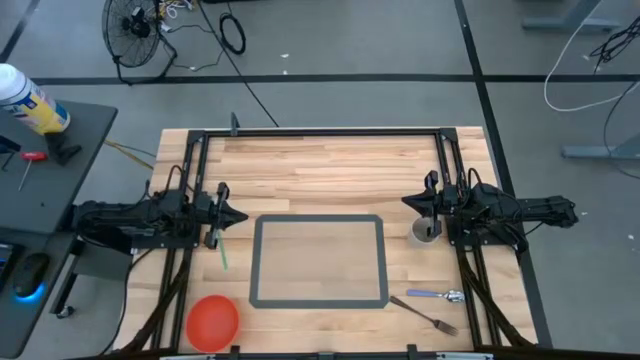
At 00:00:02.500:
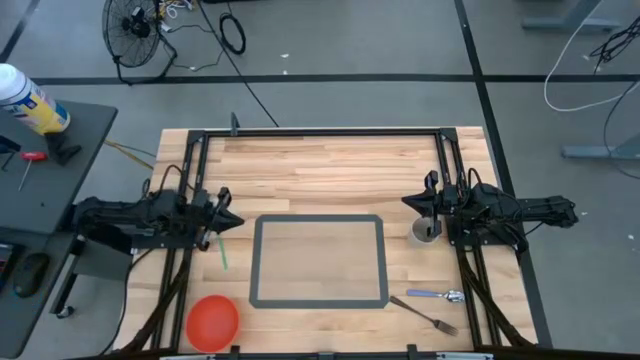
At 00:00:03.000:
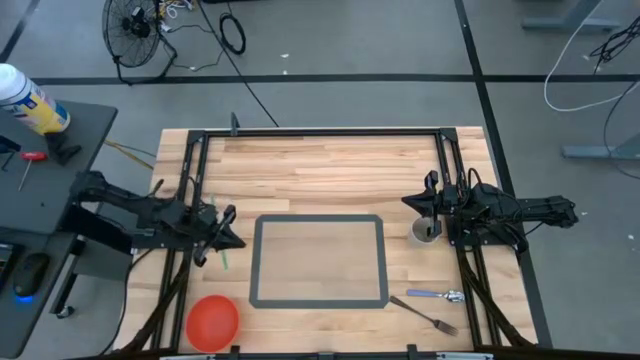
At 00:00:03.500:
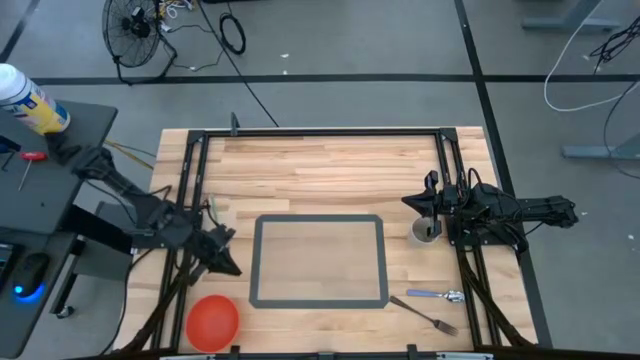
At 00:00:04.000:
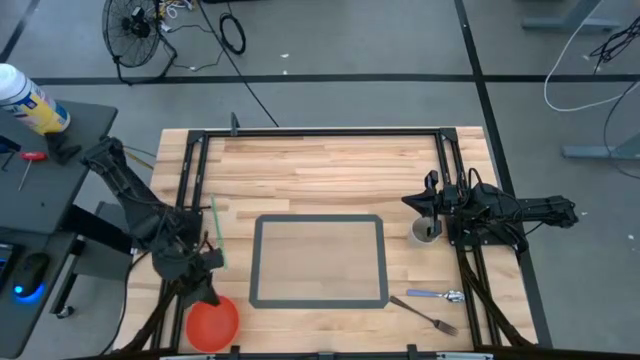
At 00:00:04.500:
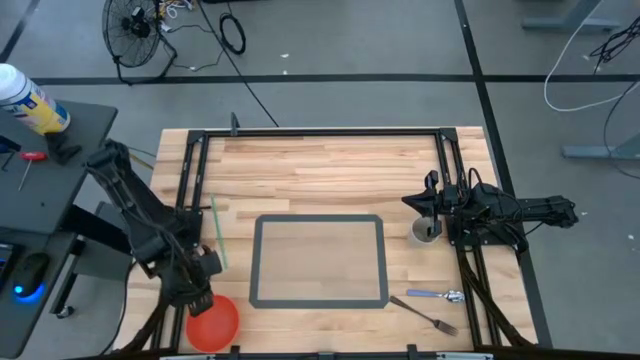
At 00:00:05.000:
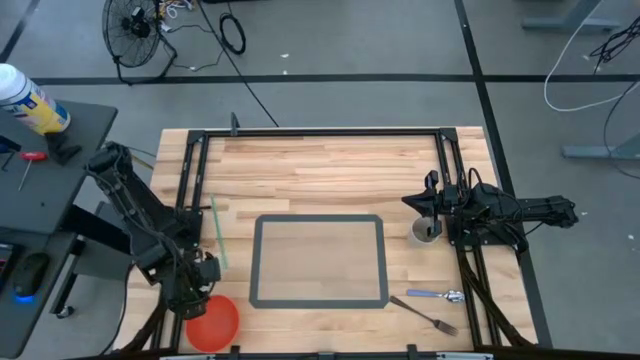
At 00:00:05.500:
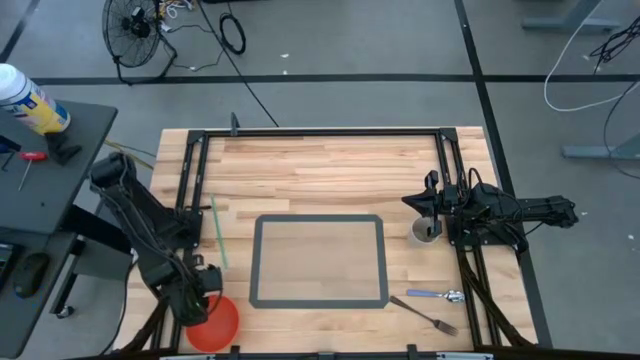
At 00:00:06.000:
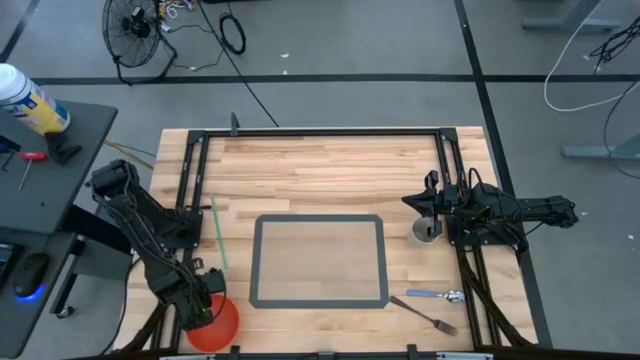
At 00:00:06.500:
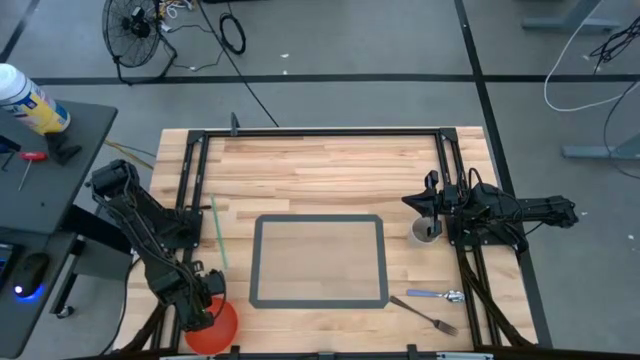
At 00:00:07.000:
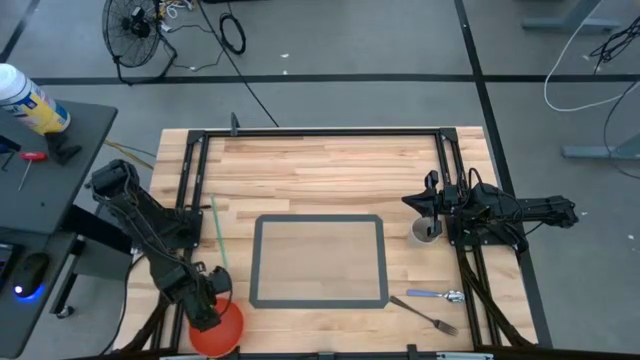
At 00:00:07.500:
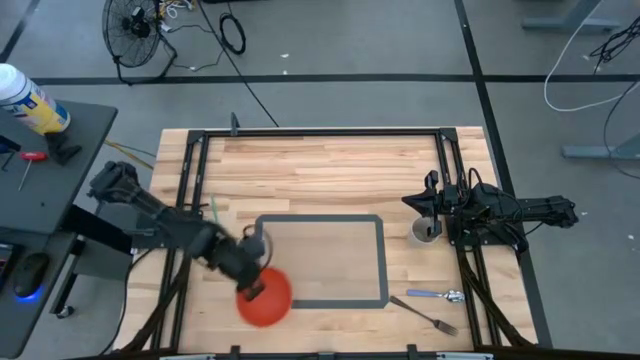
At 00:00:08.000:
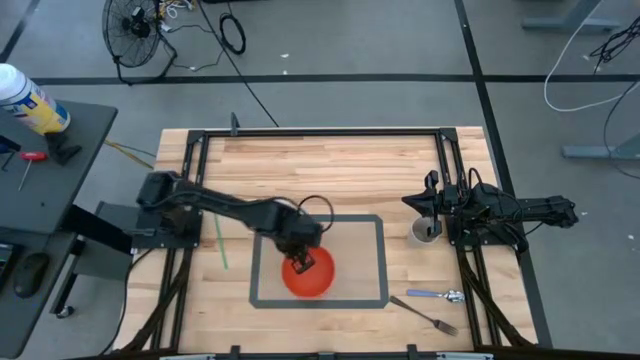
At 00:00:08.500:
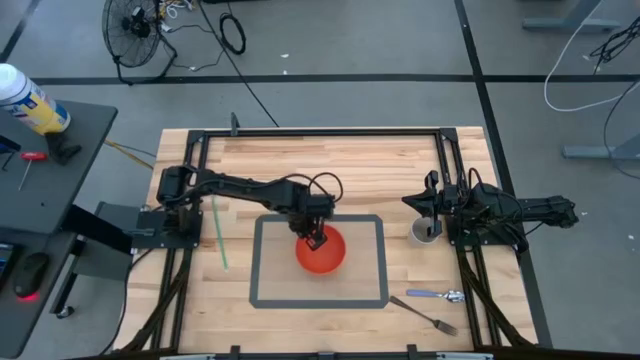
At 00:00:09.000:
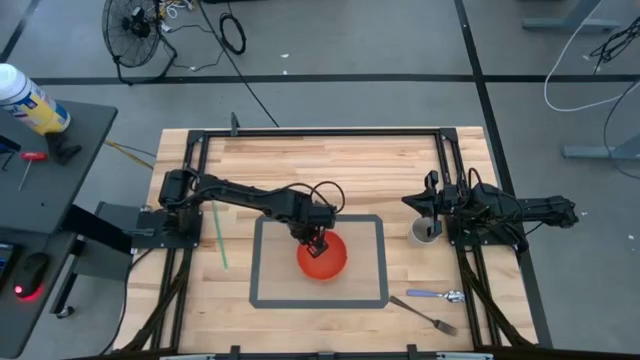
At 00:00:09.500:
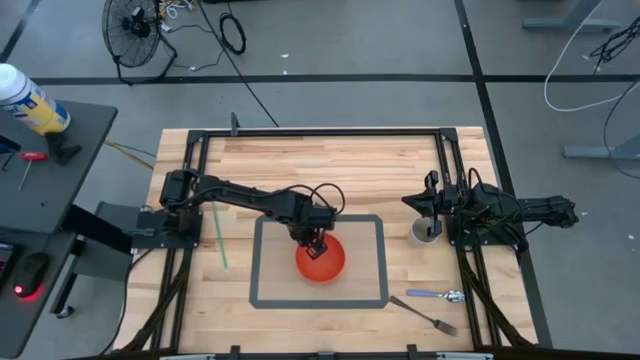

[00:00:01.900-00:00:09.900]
Task: Pick & Place Utensil
Put the orange bowl in the middle of the placemat

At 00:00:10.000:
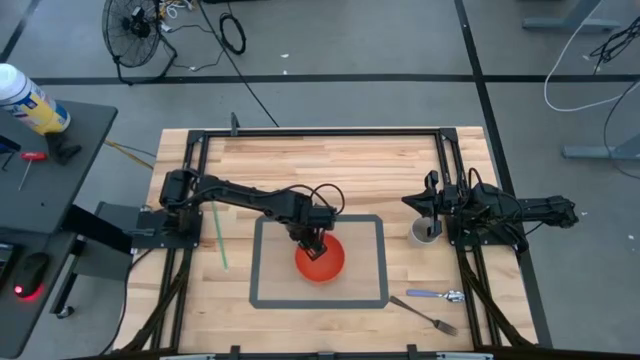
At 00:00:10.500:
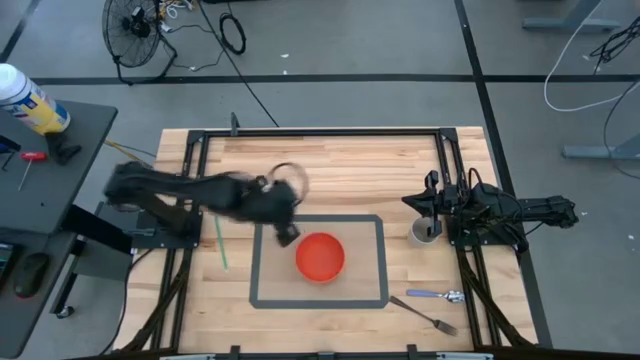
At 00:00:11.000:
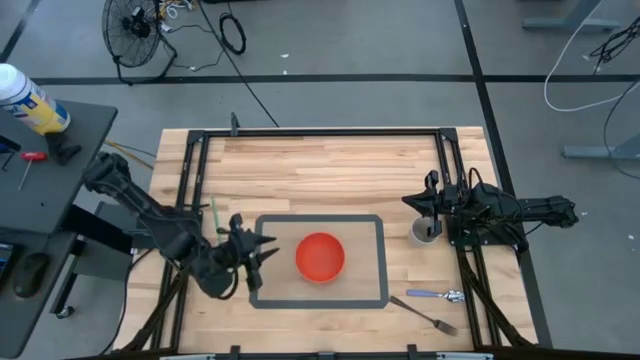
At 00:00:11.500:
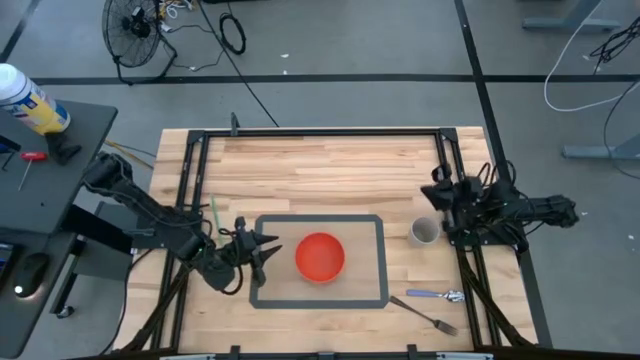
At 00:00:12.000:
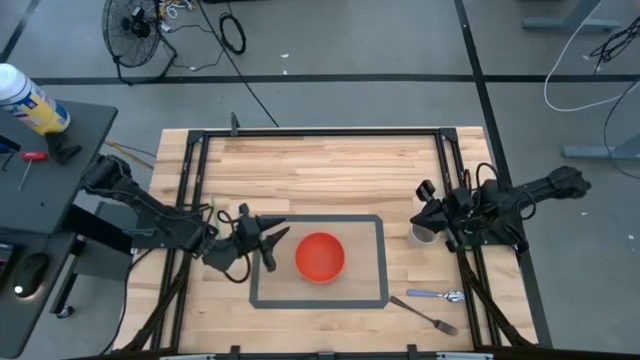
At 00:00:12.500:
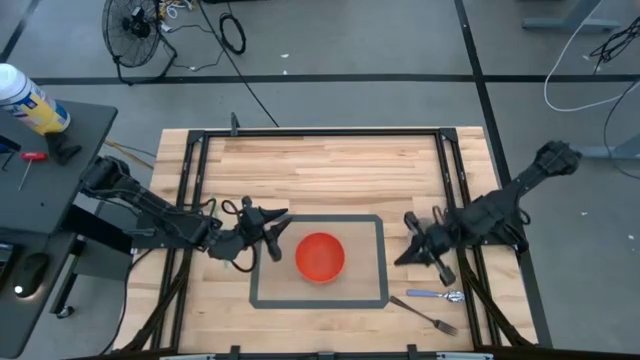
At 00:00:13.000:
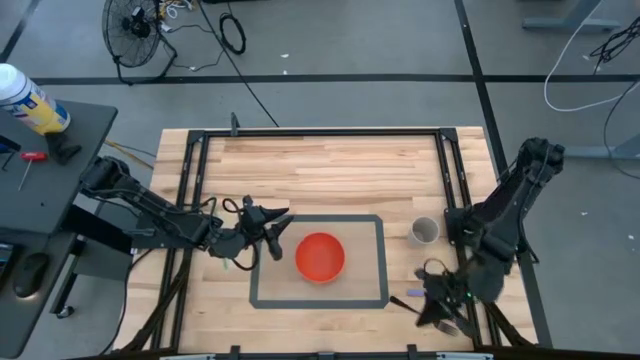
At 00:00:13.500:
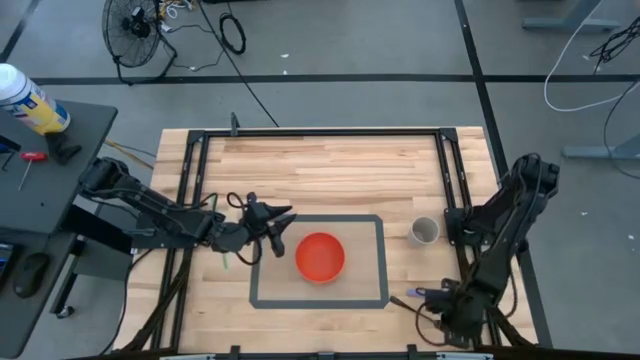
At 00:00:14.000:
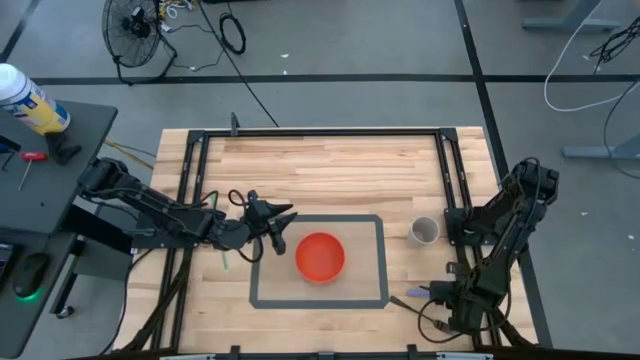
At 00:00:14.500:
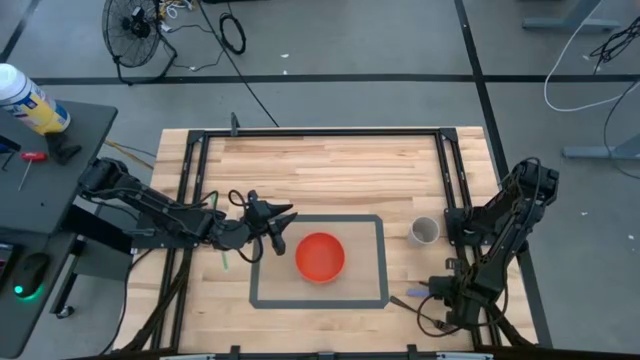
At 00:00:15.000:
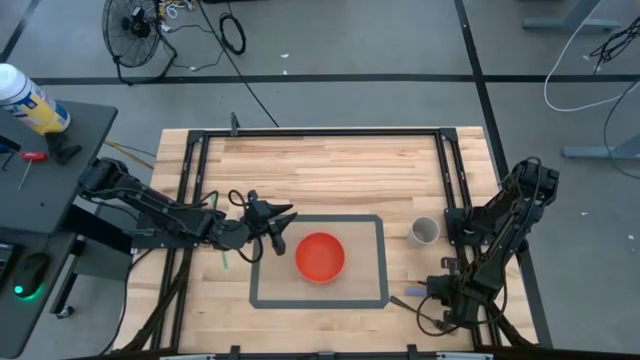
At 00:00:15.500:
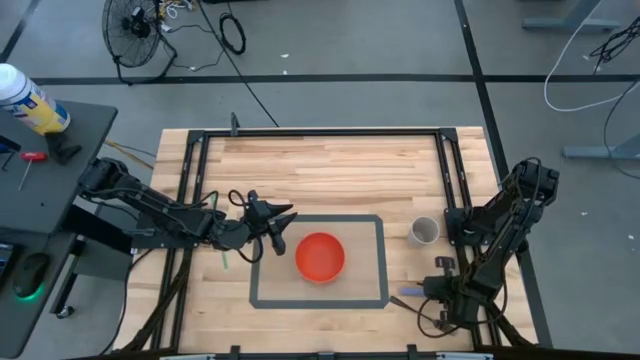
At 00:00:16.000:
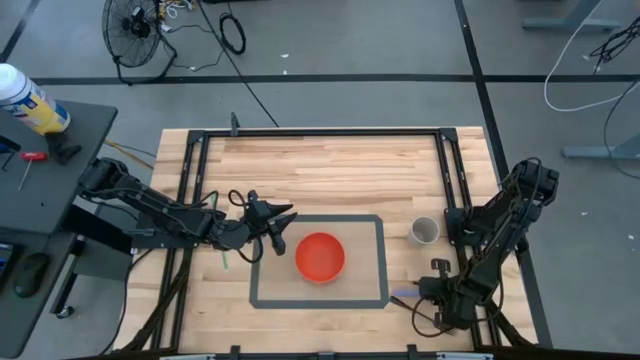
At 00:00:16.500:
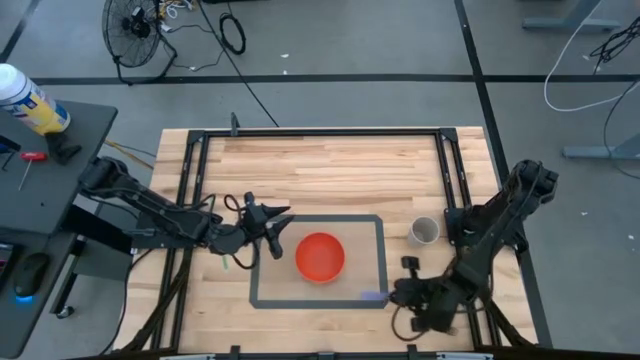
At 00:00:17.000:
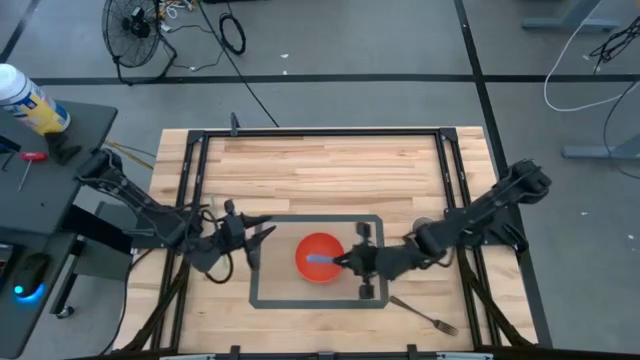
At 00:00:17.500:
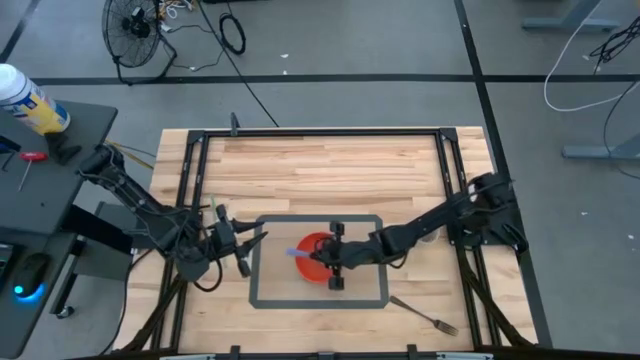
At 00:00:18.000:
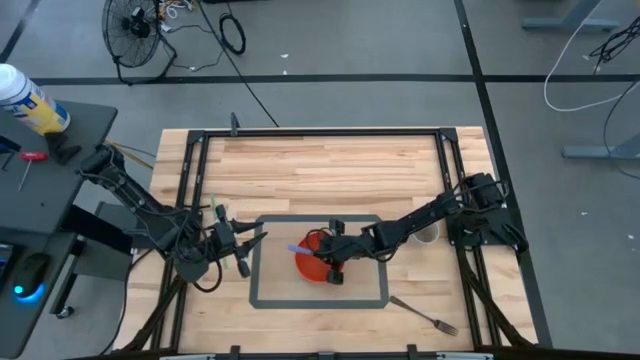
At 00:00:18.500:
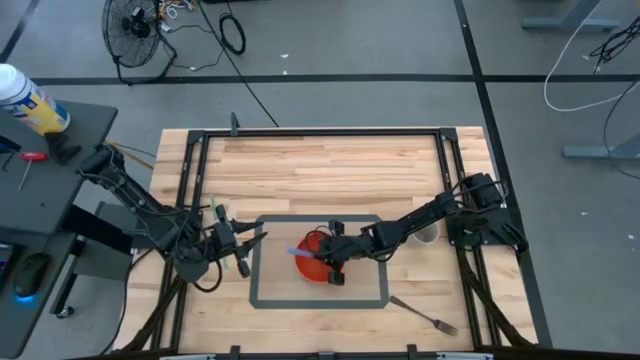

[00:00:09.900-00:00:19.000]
Put the blue spoon into the orange bowl

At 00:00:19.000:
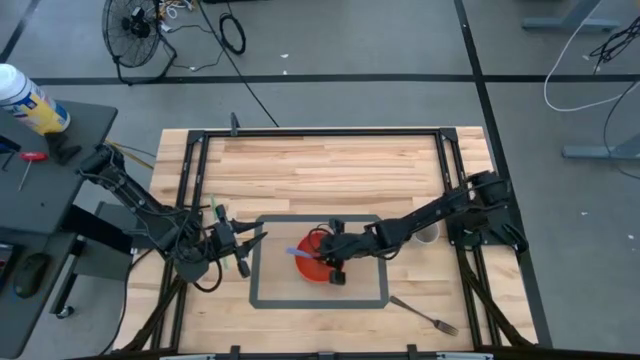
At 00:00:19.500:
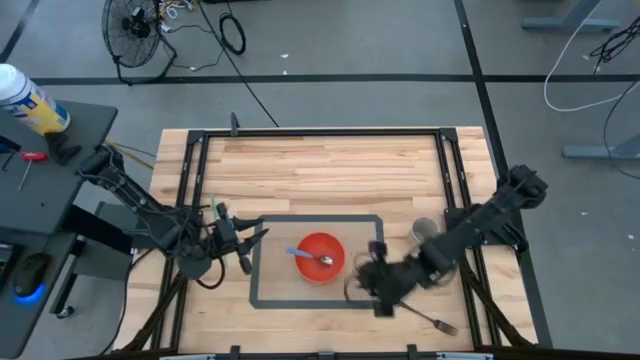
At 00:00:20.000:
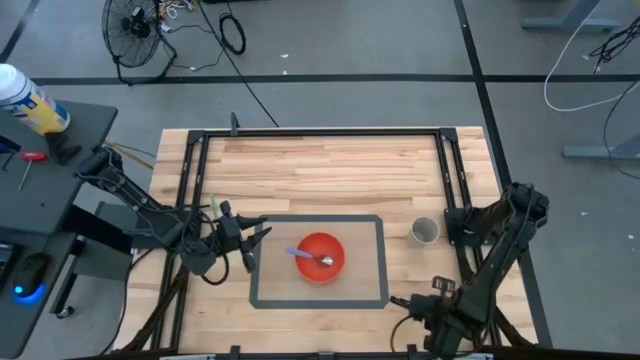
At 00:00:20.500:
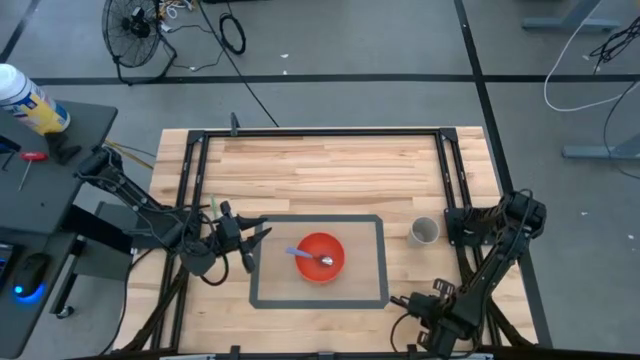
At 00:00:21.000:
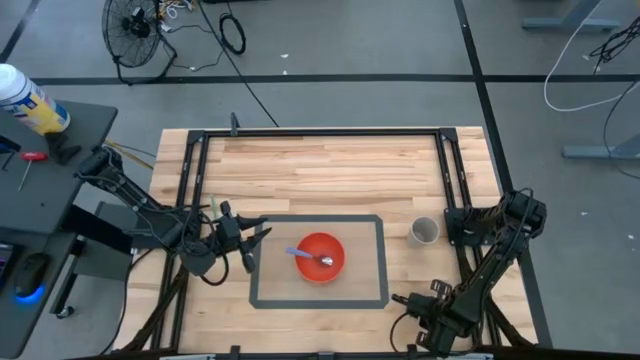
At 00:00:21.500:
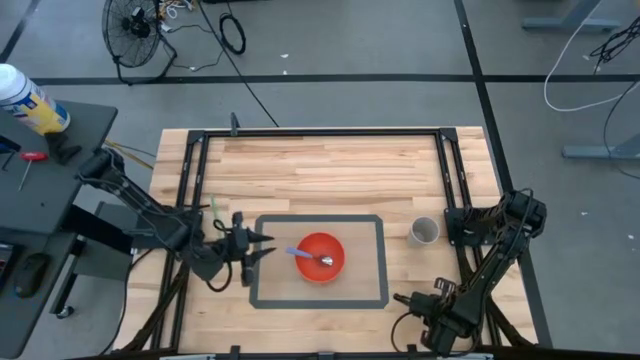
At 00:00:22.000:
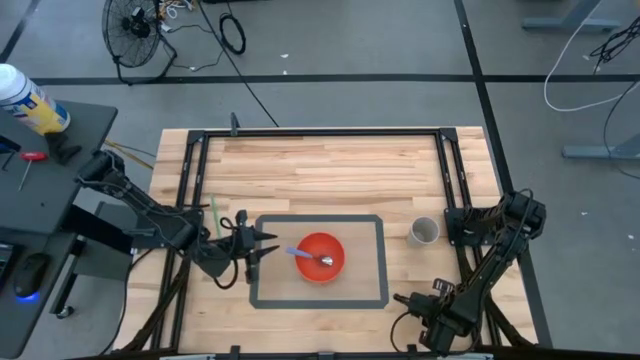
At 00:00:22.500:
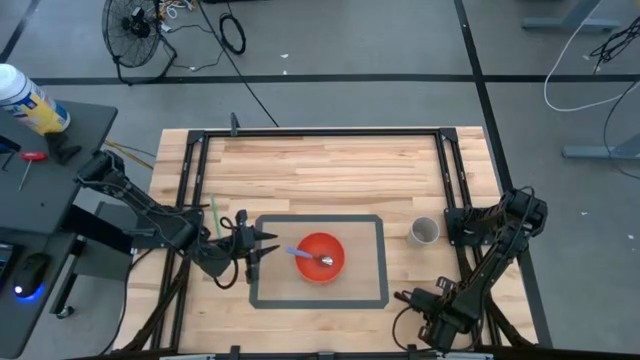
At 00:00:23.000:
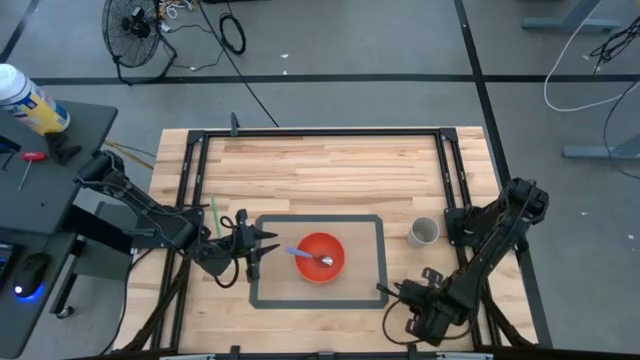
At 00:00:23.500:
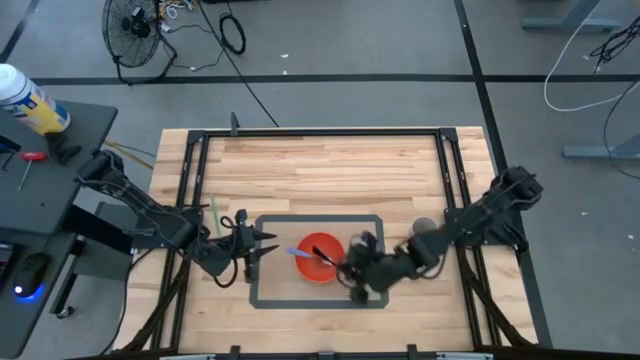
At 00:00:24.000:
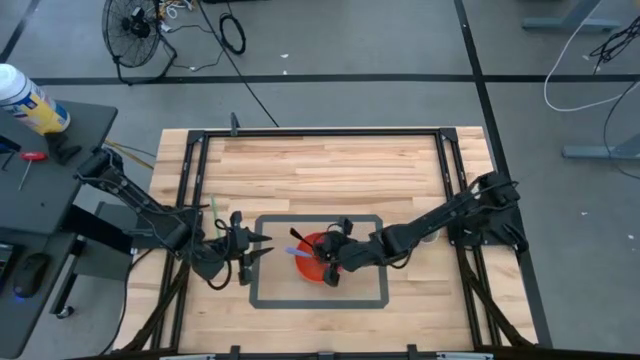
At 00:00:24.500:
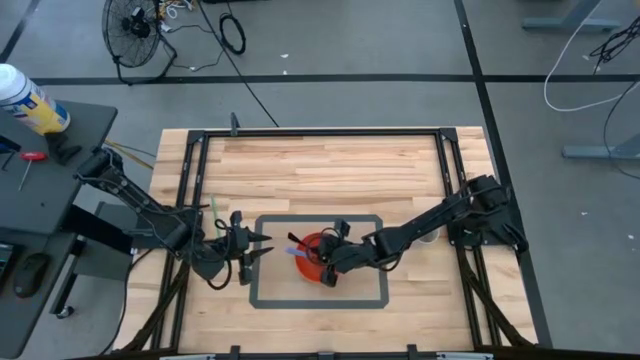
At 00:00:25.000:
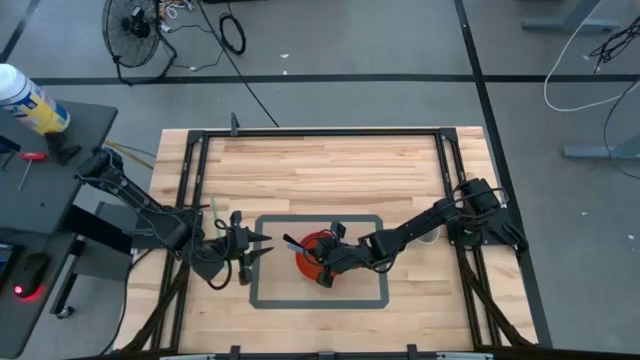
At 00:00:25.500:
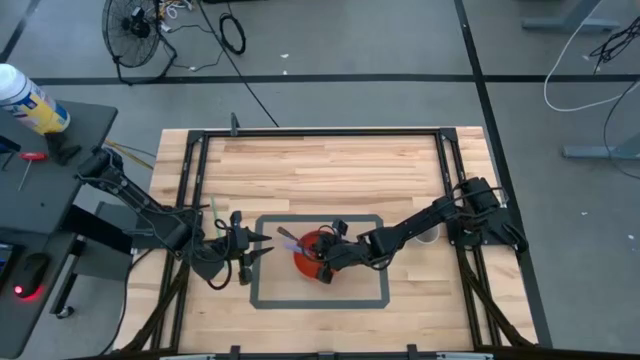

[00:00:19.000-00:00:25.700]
Put the black fork into the orange bowl
